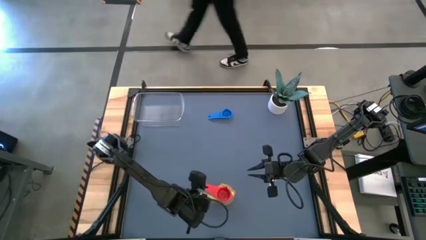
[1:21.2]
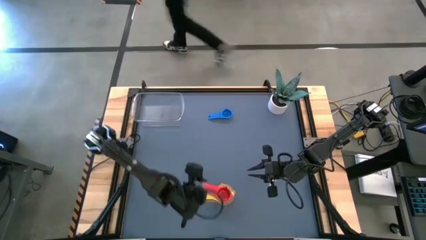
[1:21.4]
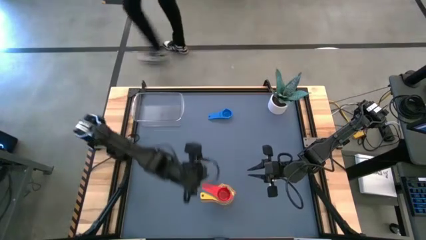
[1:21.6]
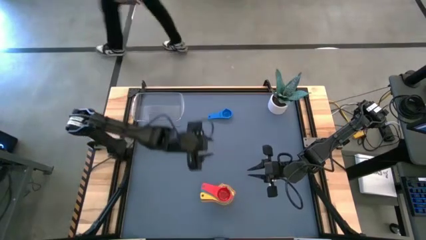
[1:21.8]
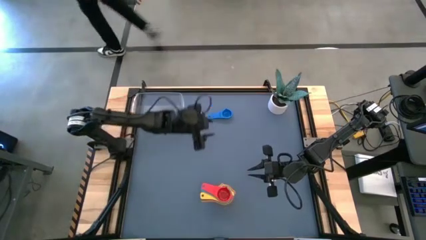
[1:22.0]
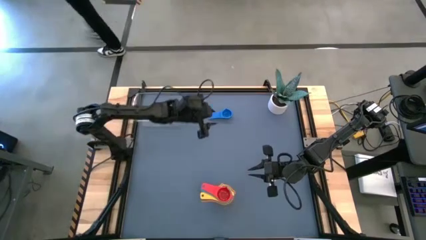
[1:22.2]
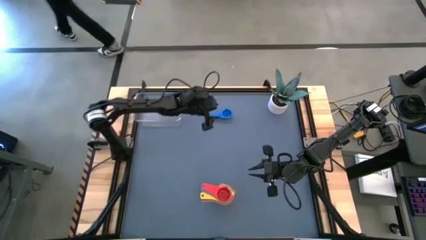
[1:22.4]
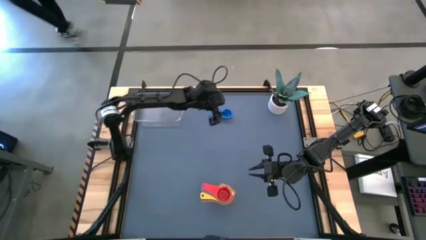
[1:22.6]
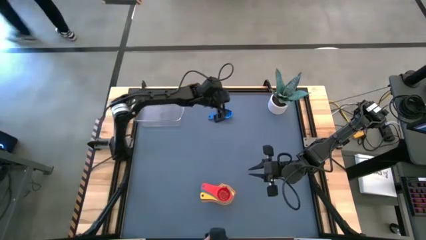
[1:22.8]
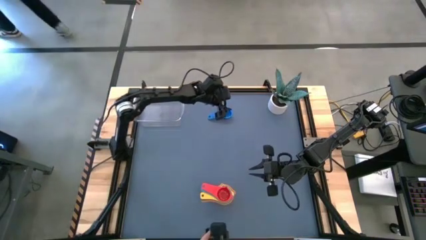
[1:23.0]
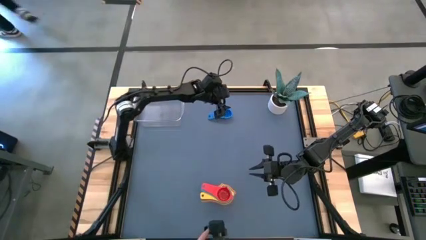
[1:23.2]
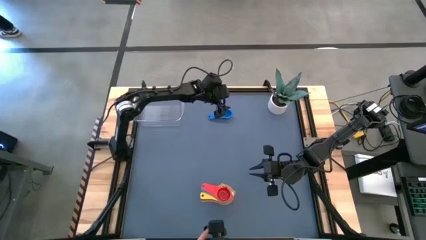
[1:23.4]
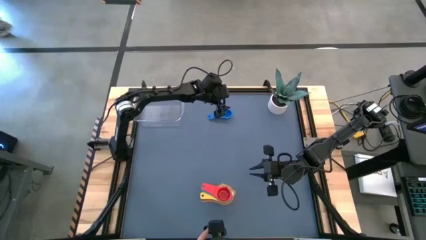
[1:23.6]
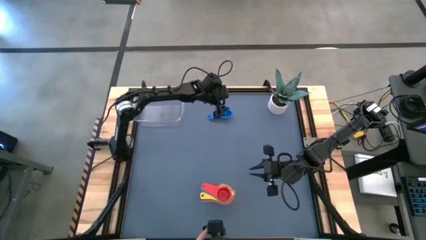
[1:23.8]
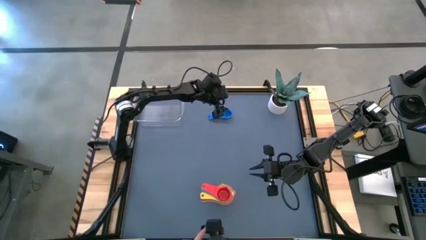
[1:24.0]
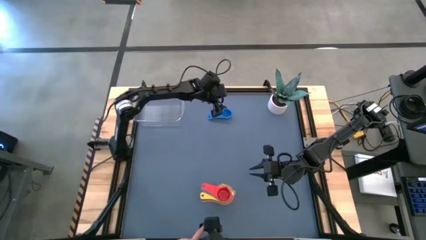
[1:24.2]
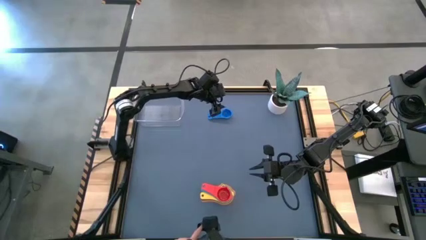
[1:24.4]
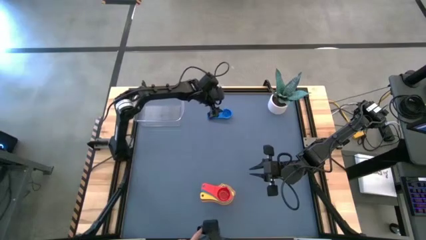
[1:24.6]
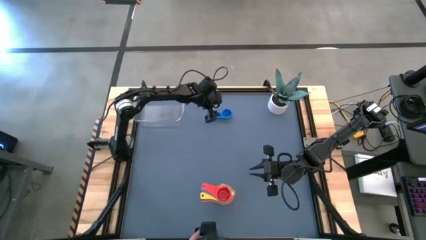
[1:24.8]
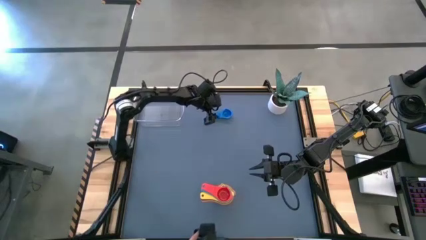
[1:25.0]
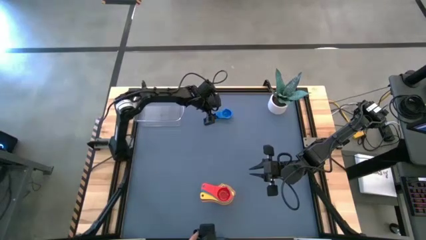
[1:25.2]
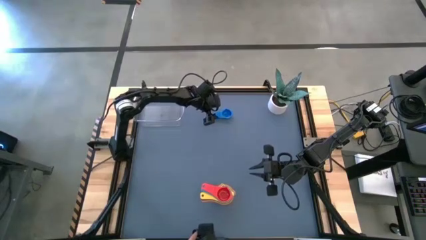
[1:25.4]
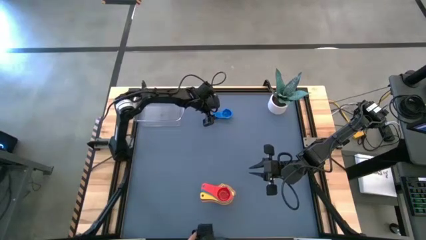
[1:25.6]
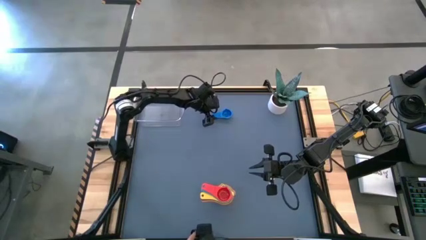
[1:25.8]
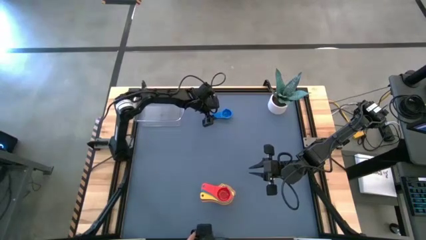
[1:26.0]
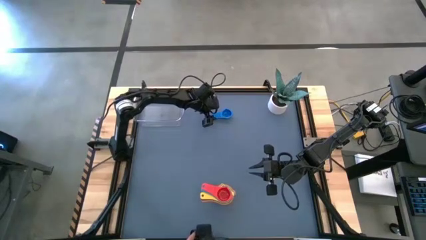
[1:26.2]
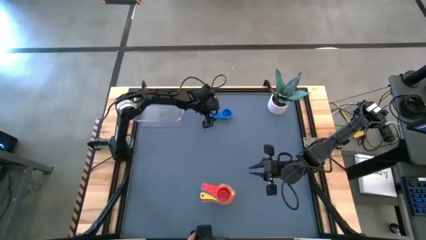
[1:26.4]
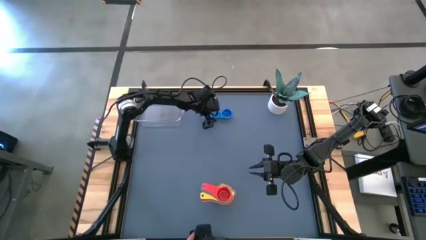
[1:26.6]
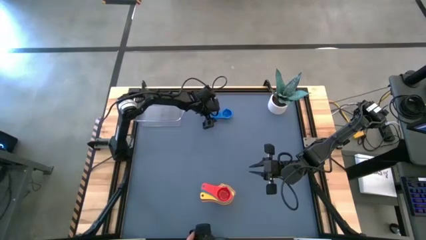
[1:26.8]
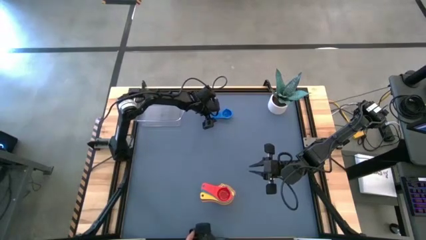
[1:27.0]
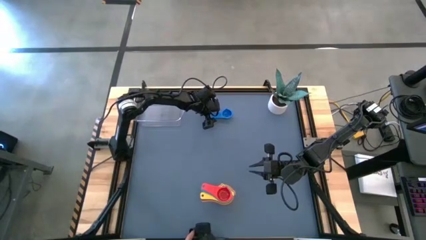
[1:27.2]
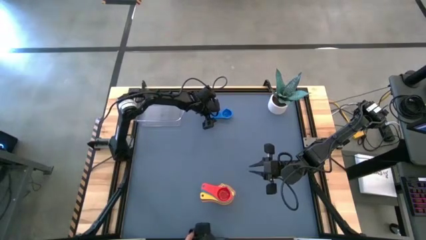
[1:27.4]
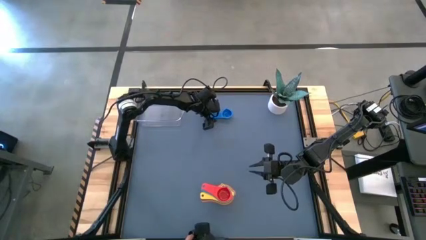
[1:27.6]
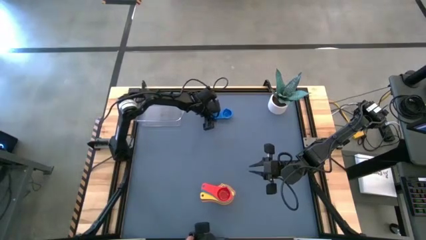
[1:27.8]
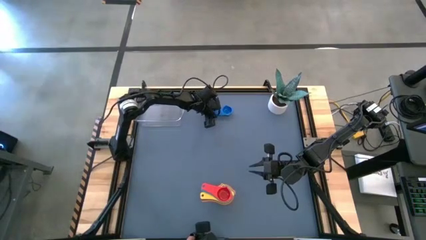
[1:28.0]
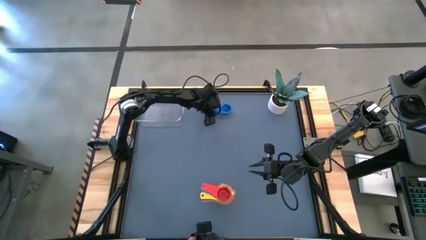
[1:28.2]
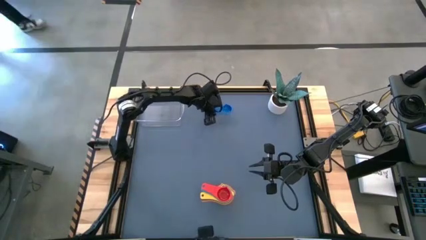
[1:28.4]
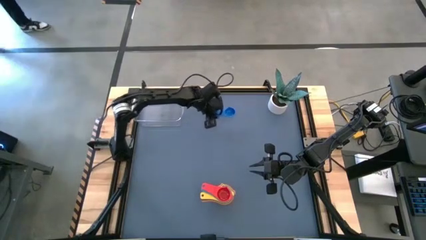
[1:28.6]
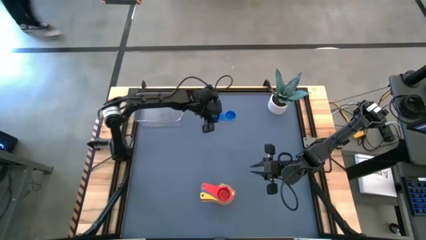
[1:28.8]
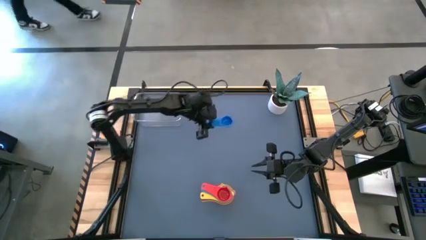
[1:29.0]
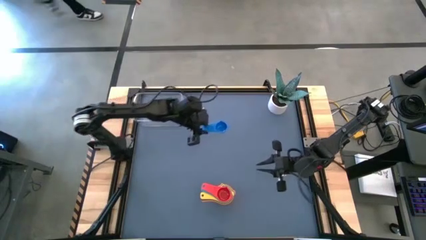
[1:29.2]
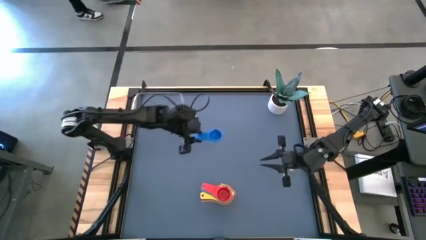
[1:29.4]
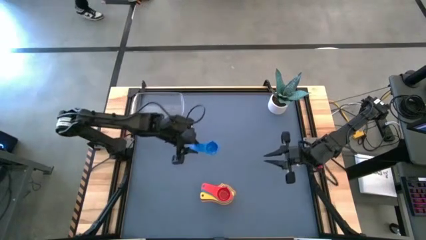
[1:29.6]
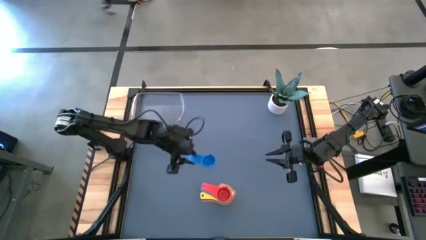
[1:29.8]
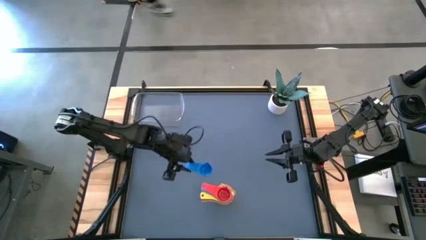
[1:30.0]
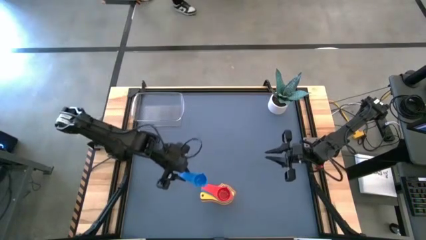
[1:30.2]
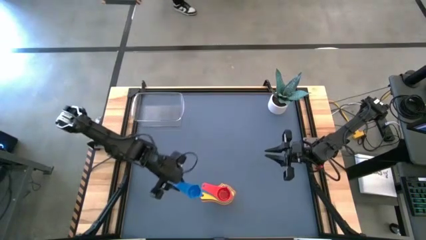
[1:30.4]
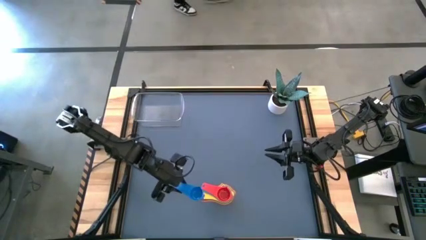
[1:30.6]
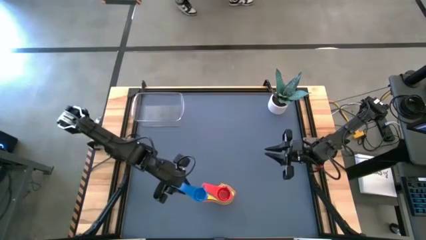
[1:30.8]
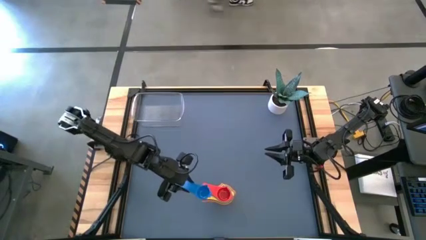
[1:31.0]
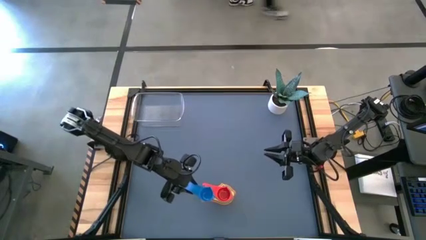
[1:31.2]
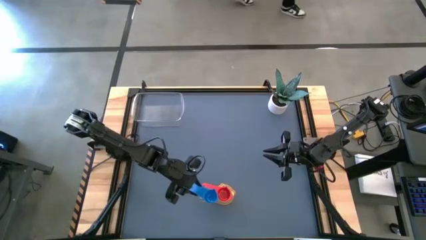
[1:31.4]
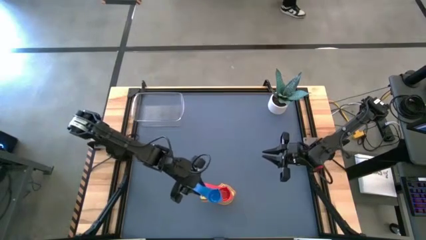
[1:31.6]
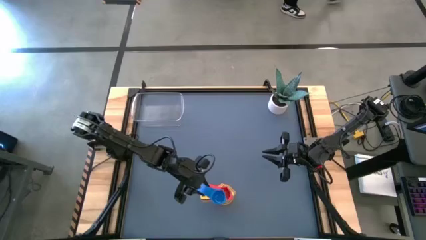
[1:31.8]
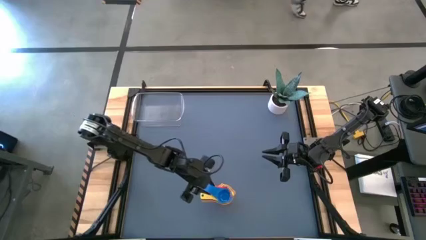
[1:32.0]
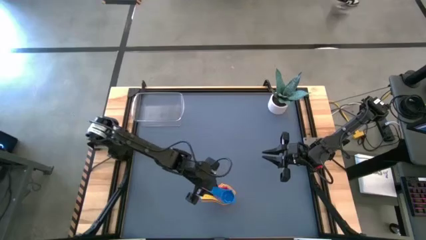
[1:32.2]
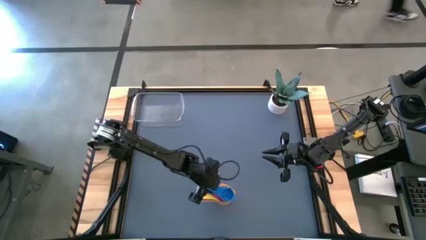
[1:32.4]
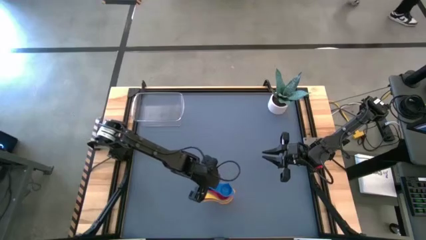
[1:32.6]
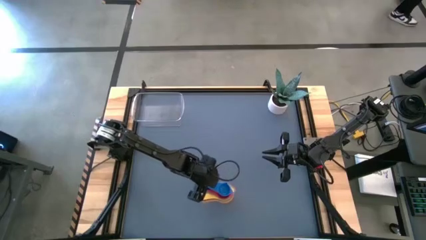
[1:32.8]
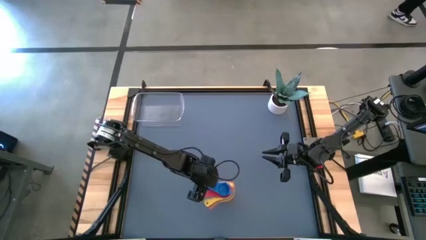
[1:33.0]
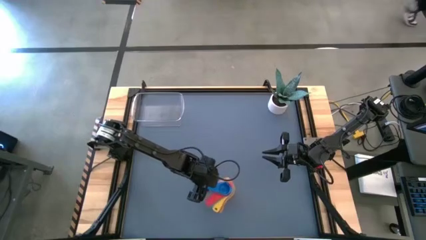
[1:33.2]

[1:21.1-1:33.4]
Task: Nest measuring cups in basket
Stack the blue measuring cup on top of the red measuring cup

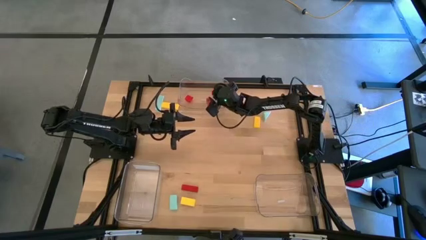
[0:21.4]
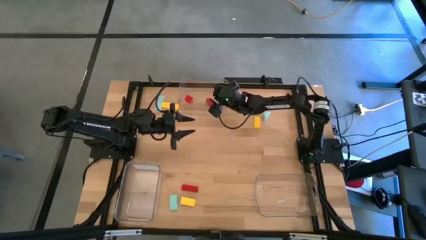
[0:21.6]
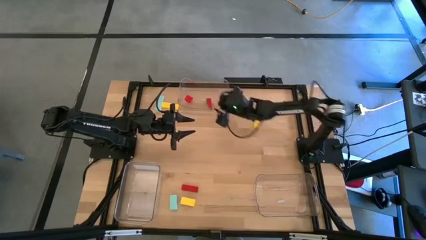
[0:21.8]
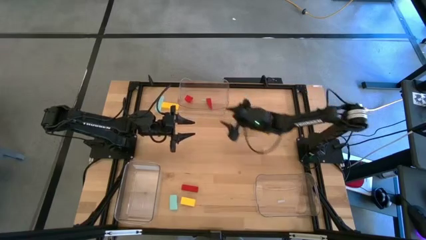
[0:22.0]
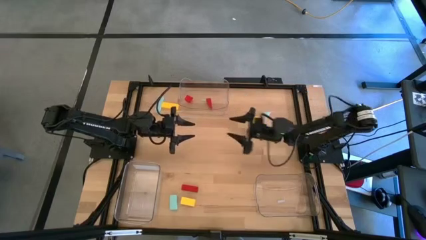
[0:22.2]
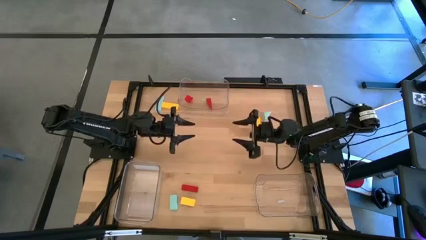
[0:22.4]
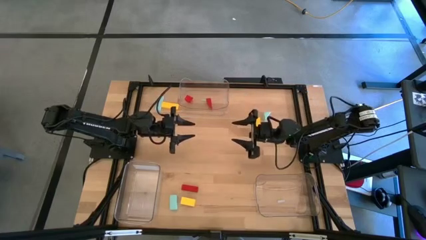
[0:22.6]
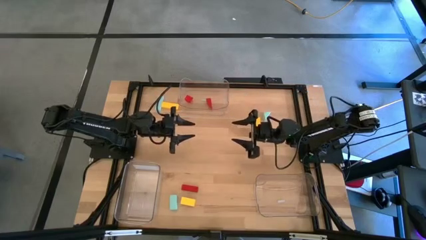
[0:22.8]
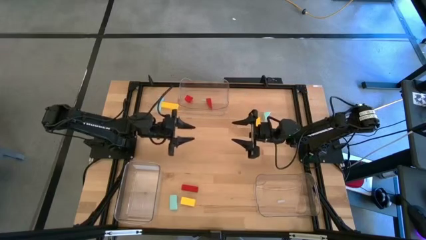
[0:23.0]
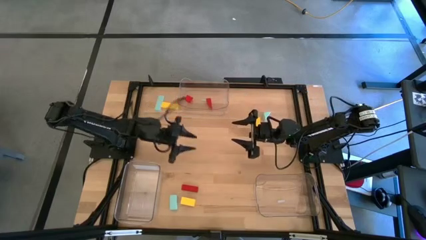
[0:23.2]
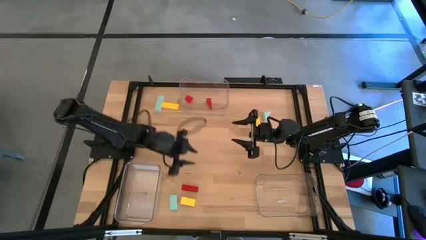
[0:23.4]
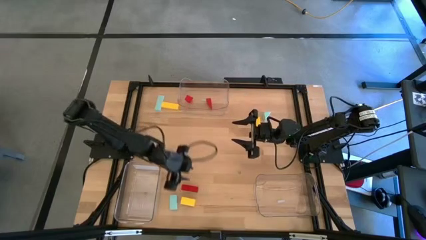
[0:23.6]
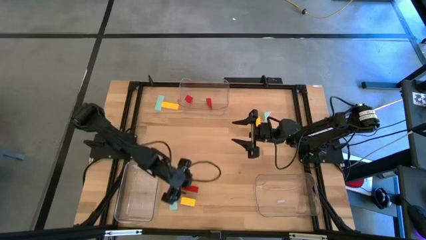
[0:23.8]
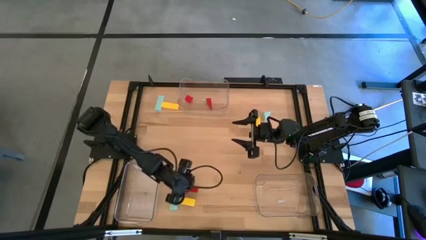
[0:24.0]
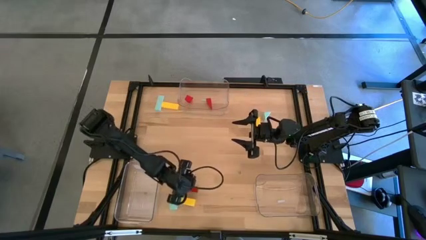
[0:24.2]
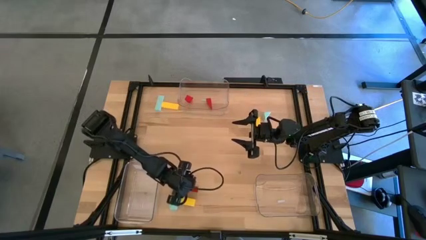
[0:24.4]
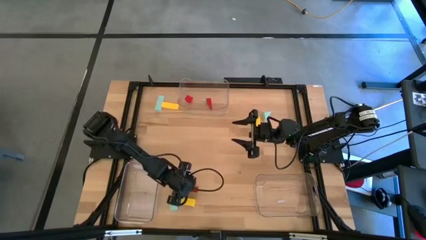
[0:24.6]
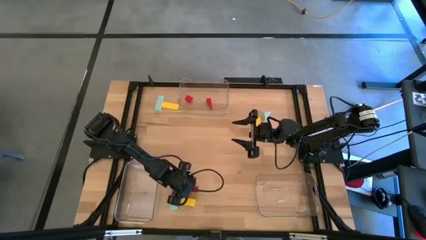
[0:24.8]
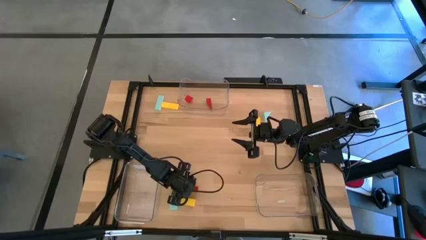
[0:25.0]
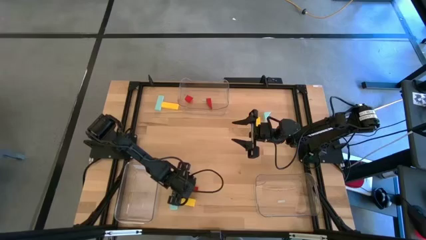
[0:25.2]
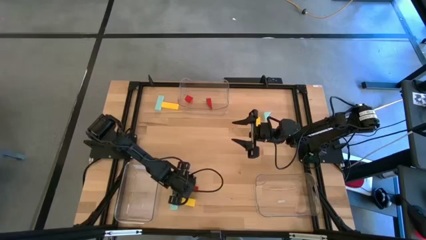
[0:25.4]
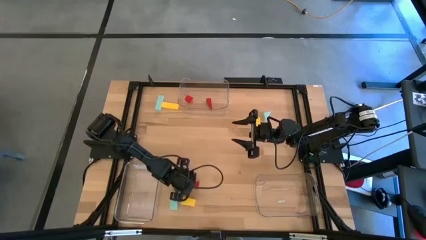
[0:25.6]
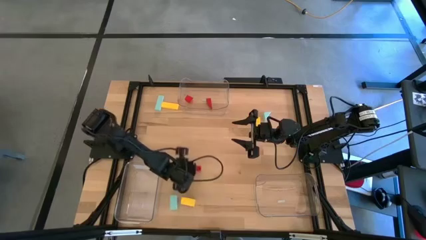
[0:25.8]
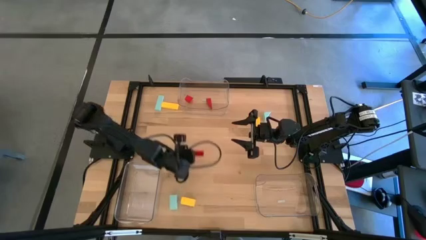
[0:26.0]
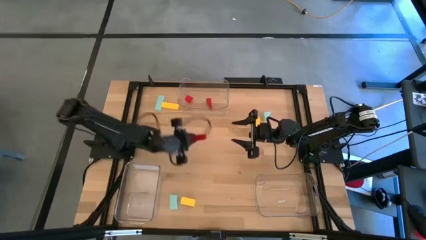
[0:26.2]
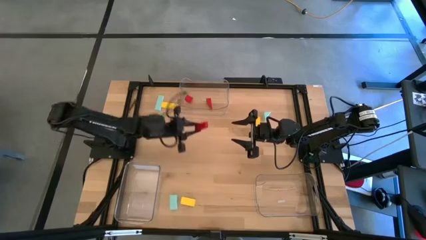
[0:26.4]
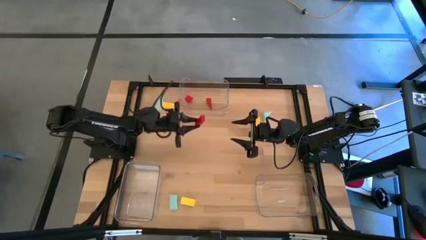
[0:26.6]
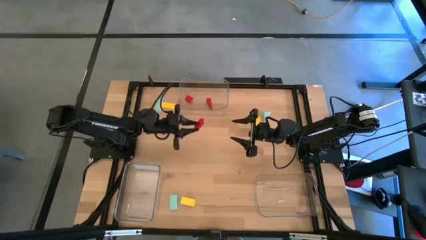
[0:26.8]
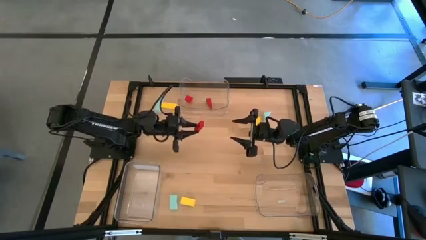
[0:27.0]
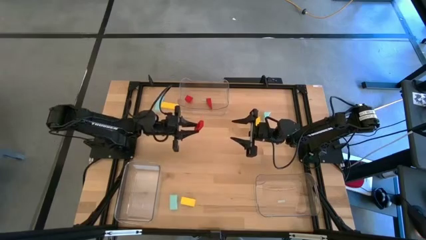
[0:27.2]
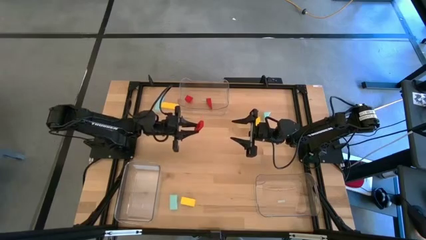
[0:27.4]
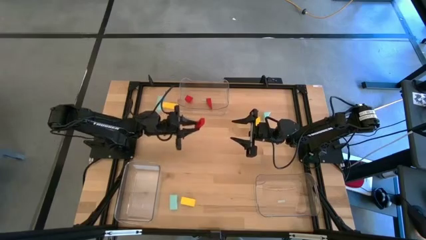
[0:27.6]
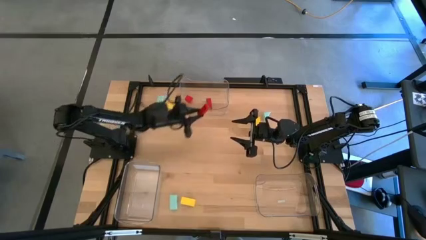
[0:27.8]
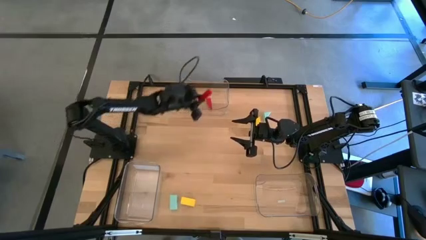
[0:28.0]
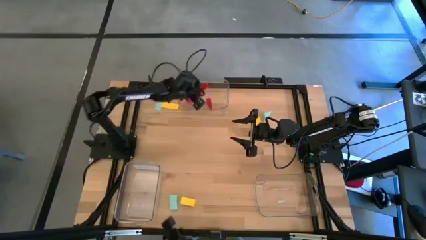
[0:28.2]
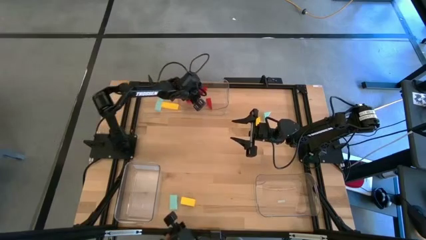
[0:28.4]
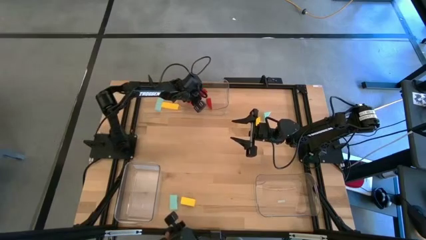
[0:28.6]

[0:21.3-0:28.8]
Task: Sort & place blocks by color
Put the red block into the top transparent bin
